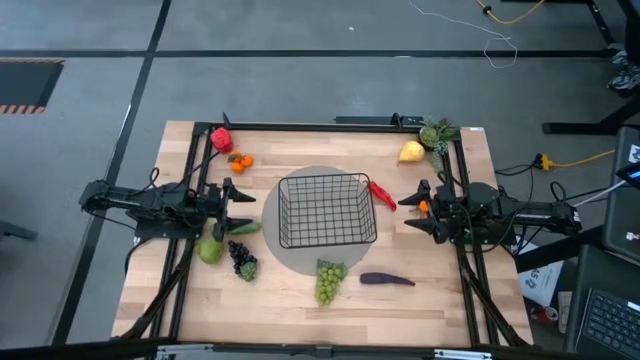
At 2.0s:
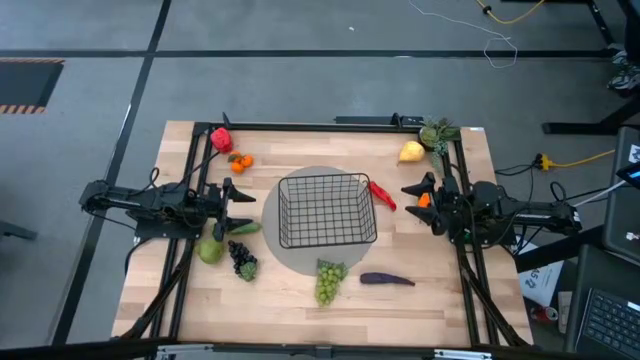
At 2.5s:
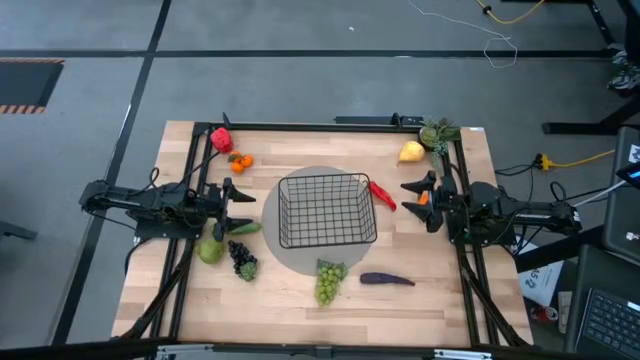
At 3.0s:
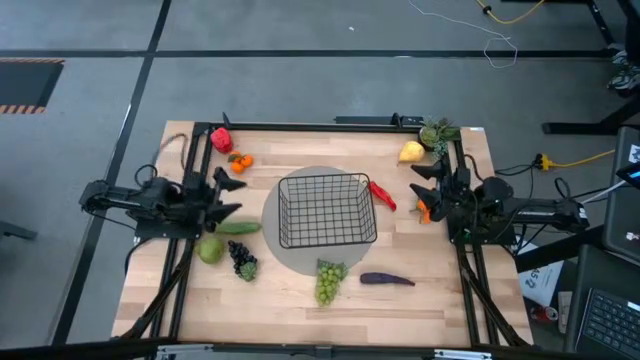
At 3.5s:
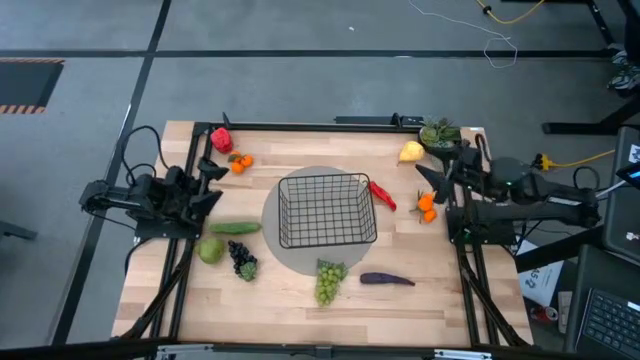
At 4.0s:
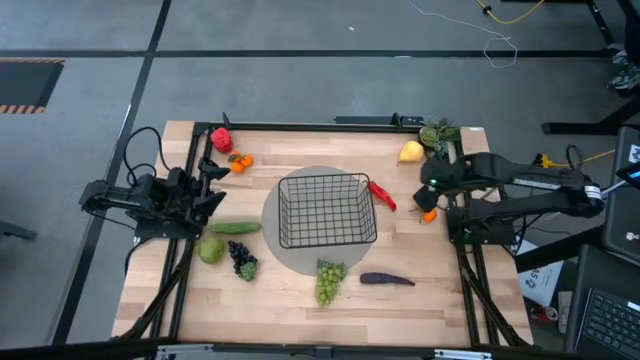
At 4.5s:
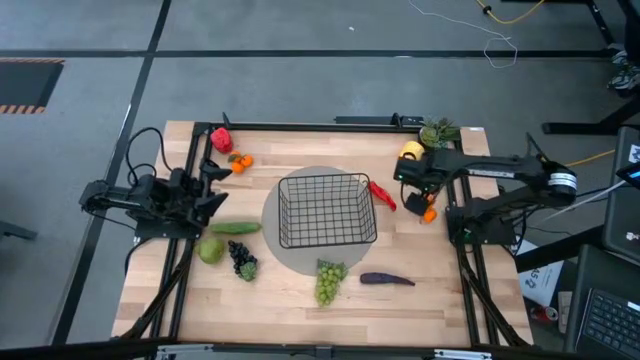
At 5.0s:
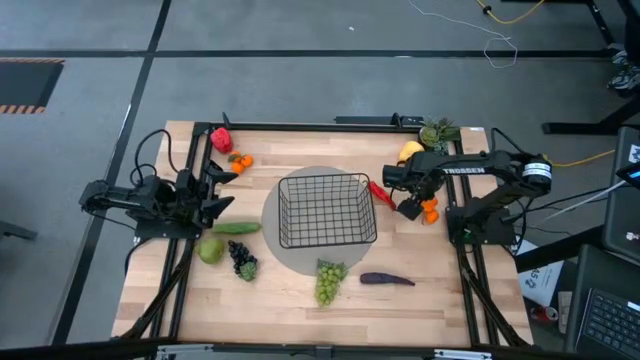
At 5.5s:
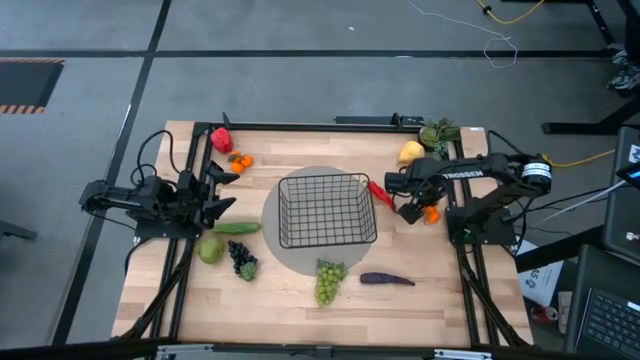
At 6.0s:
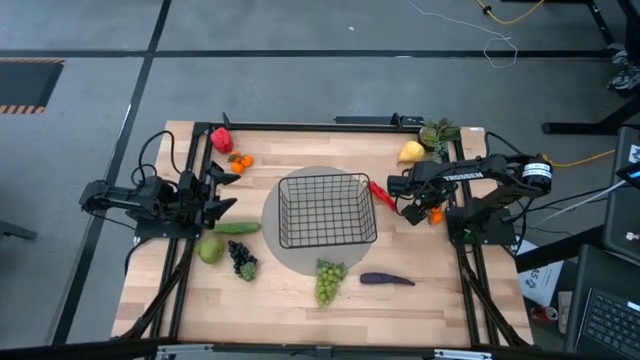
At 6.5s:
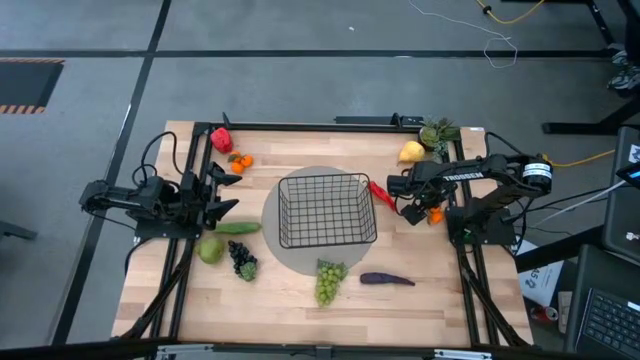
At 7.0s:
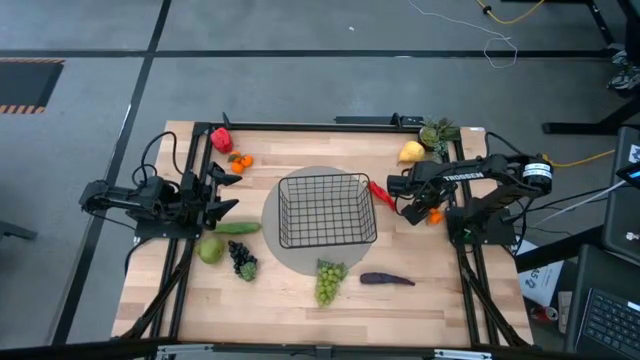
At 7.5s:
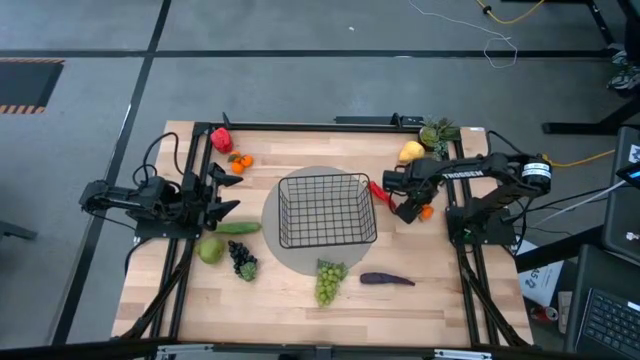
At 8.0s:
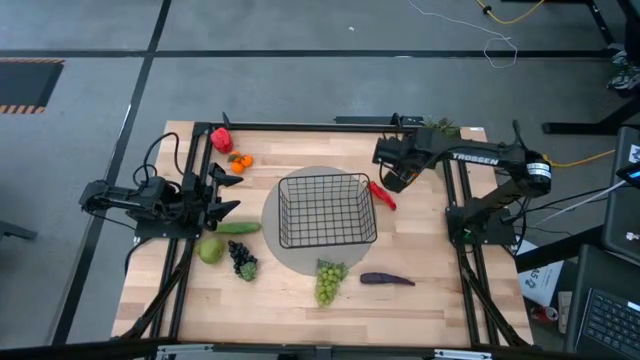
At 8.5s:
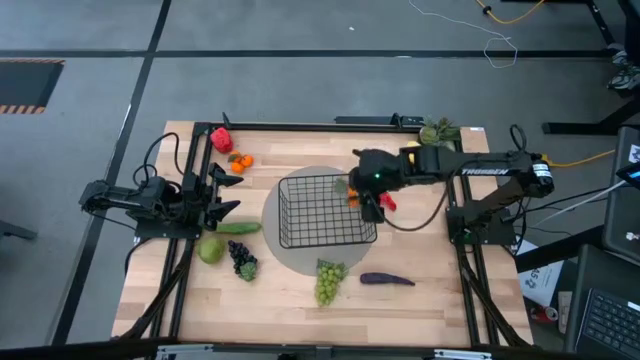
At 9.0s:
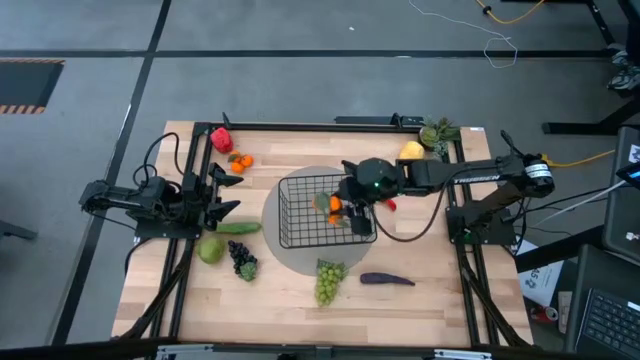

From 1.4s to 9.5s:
Task: Build produce basket
Put the orange tangerine into the wire basket

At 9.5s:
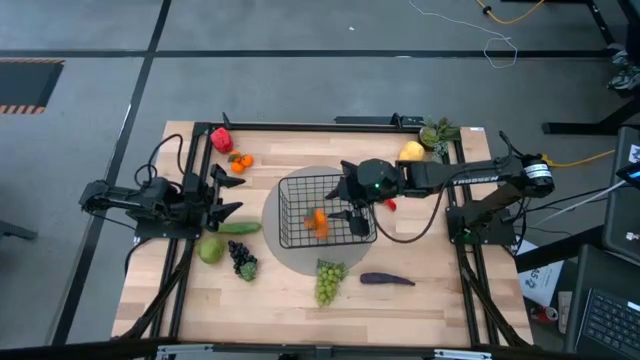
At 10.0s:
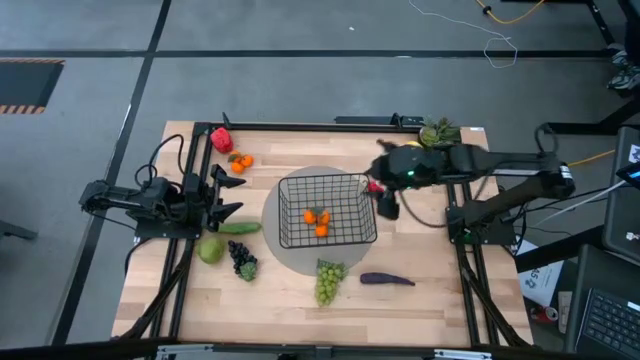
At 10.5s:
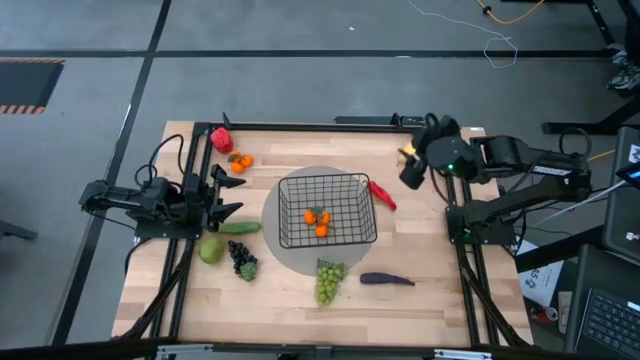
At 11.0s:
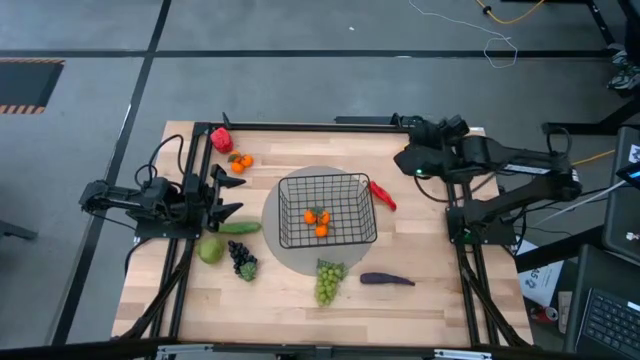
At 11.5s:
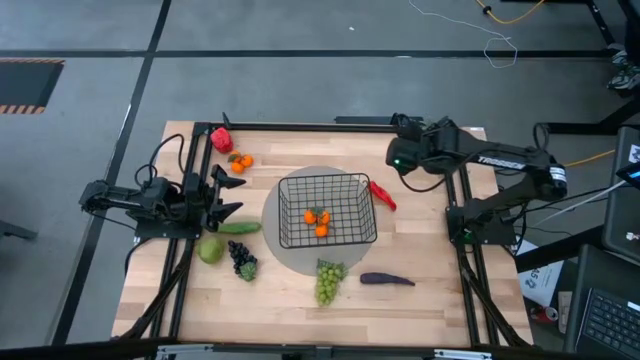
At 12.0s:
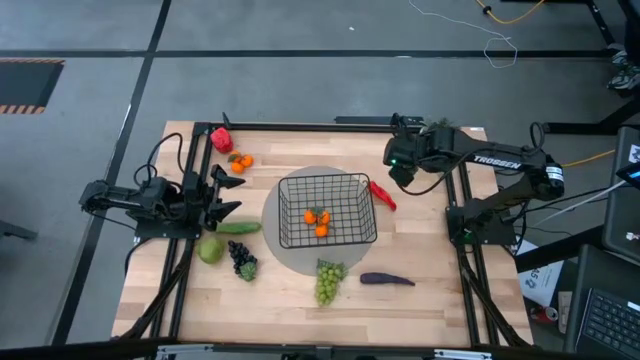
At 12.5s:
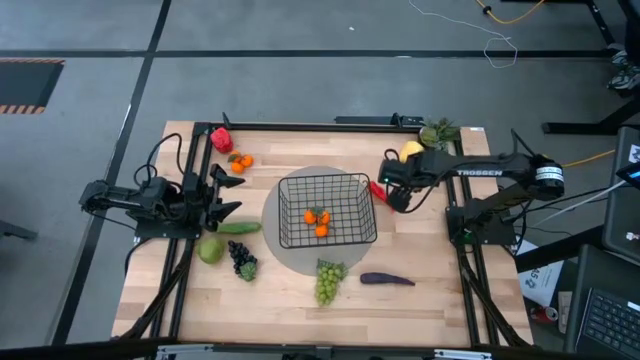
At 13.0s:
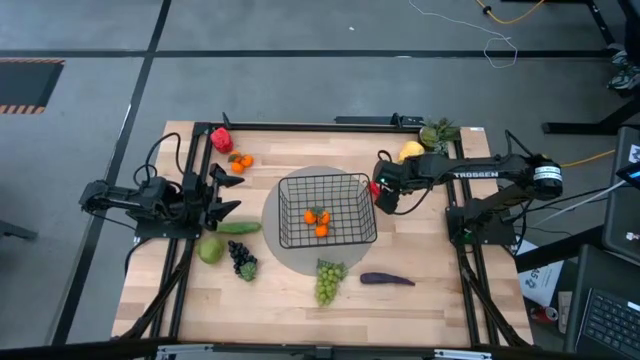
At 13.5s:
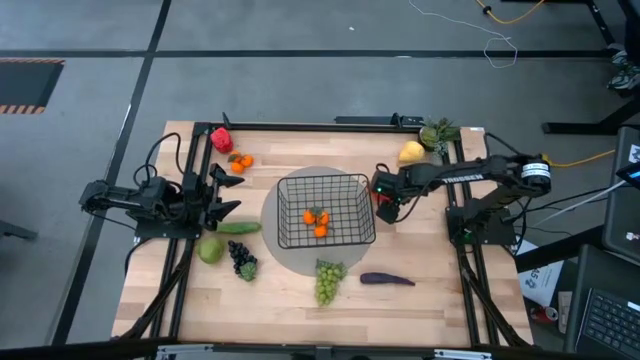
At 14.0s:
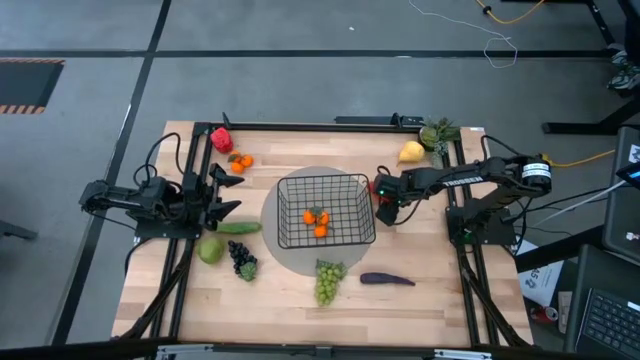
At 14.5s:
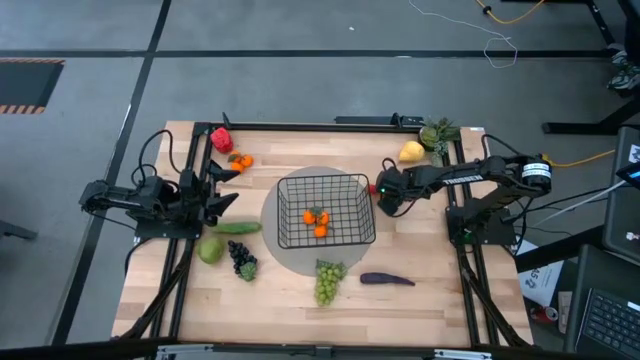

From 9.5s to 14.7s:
Put the red chili pepper into the wire basket

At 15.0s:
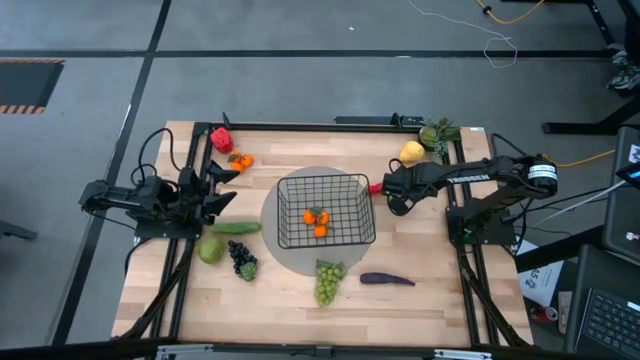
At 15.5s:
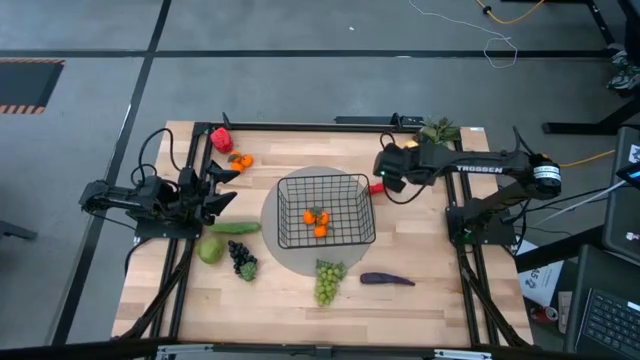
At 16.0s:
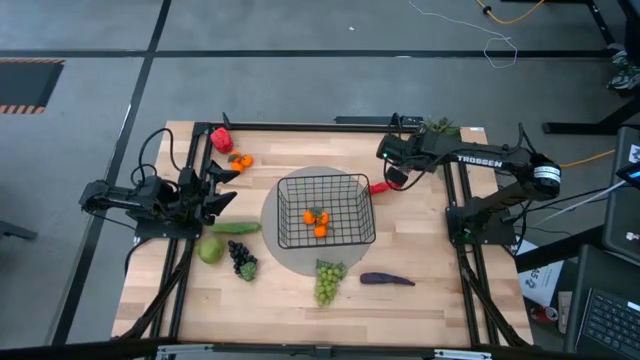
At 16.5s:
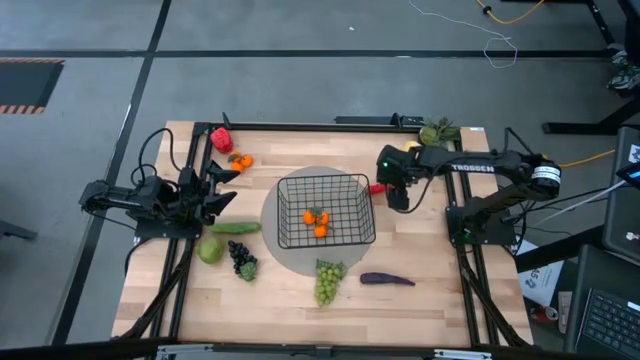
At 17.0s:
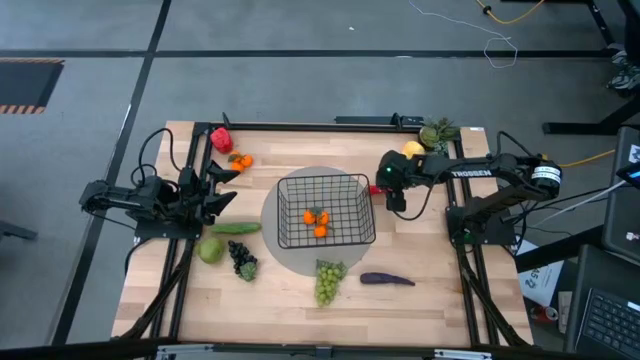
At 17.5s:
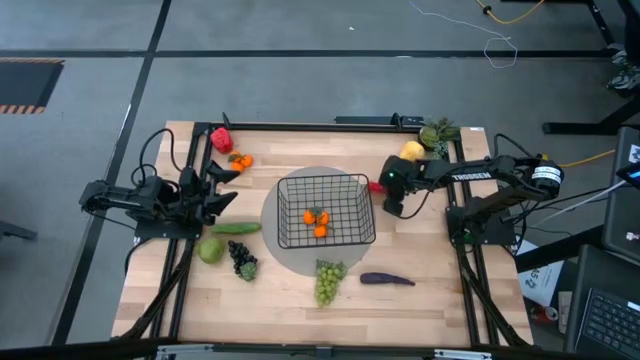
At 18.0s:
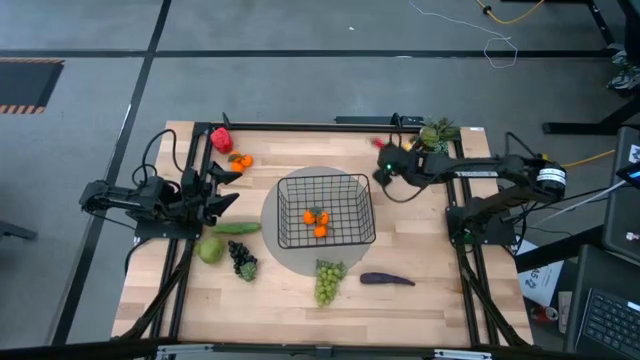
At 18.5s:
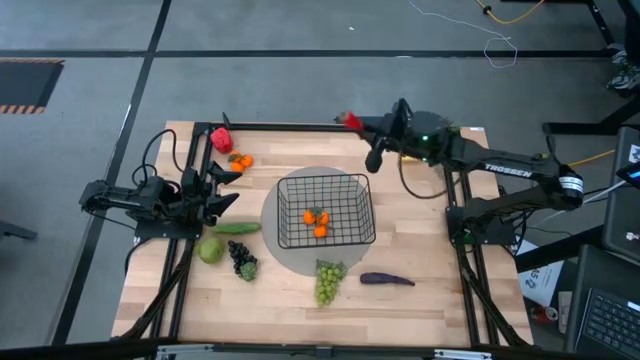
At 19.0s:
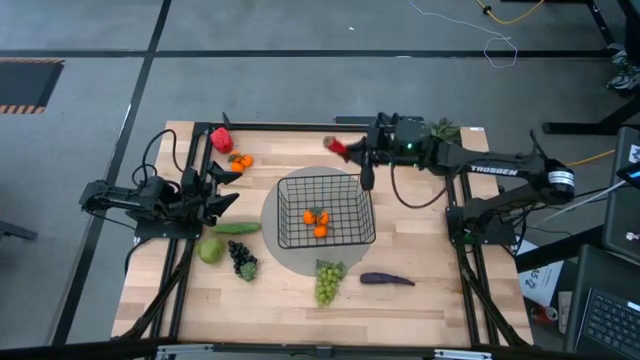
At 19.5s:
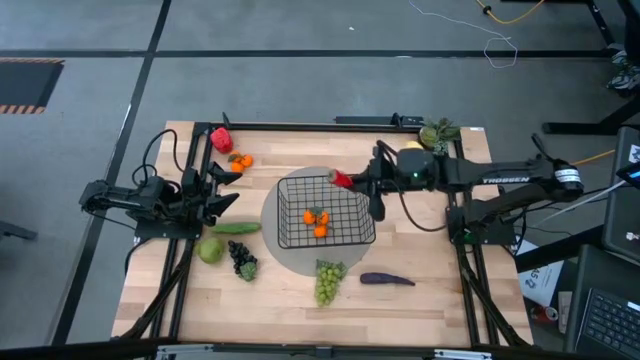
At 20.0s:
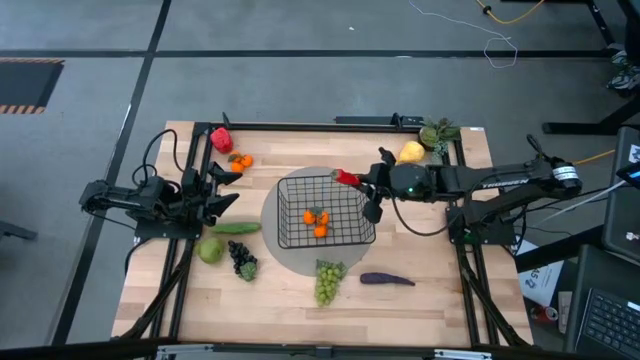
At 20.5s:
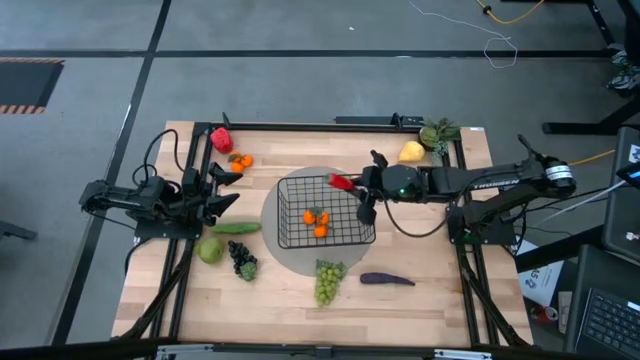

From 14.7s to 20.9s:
Put the red chili pepper into the wire basket
